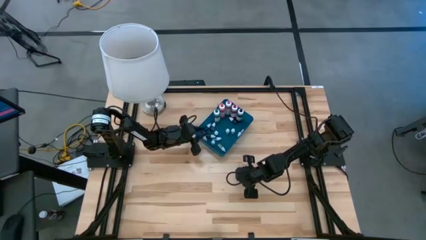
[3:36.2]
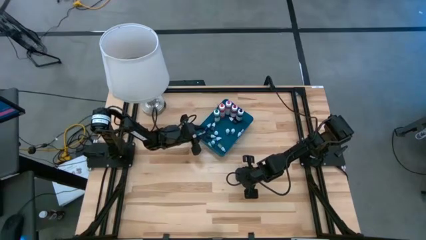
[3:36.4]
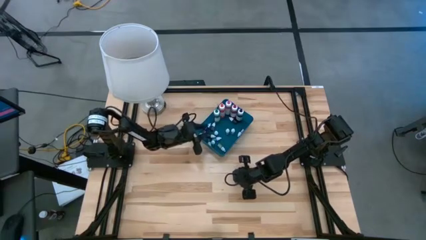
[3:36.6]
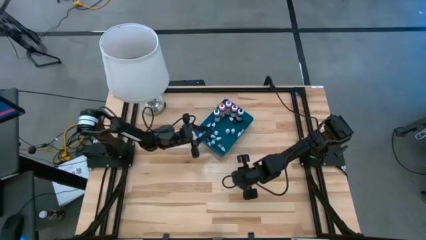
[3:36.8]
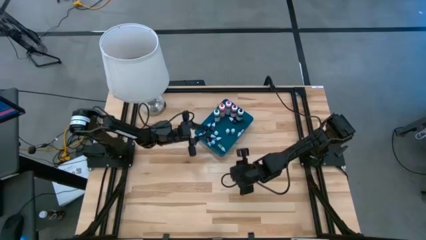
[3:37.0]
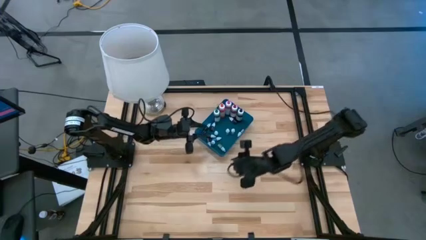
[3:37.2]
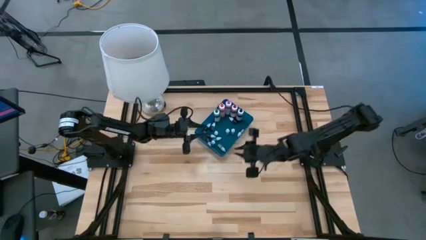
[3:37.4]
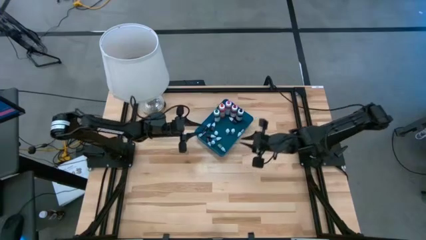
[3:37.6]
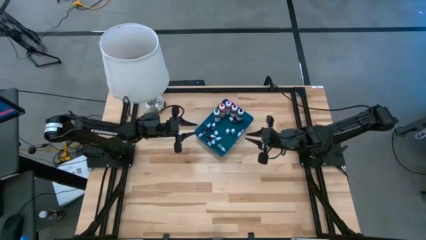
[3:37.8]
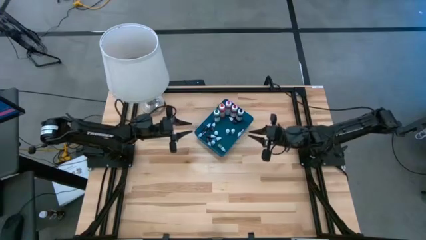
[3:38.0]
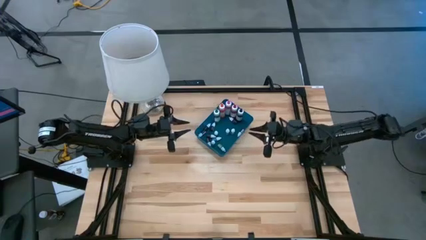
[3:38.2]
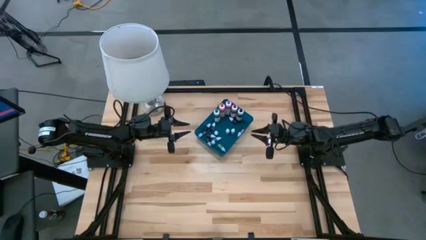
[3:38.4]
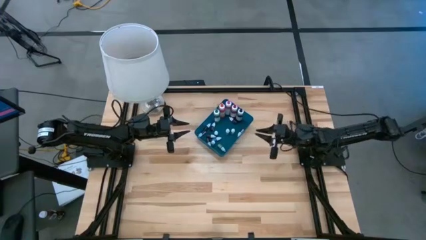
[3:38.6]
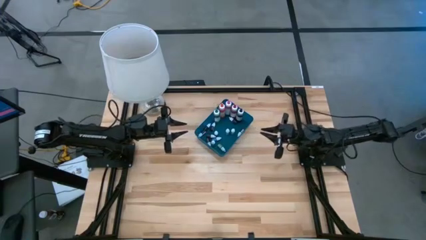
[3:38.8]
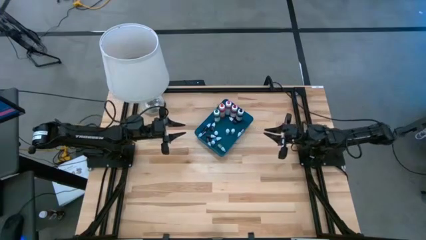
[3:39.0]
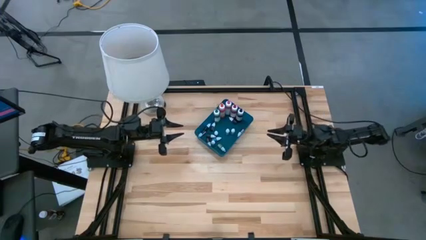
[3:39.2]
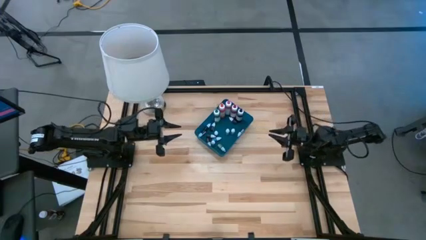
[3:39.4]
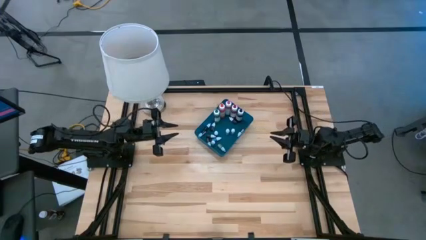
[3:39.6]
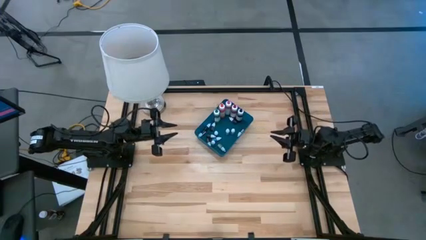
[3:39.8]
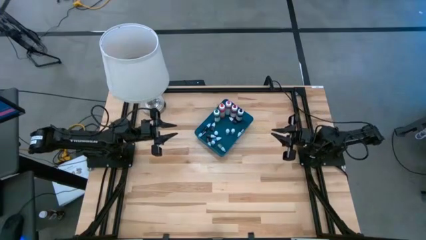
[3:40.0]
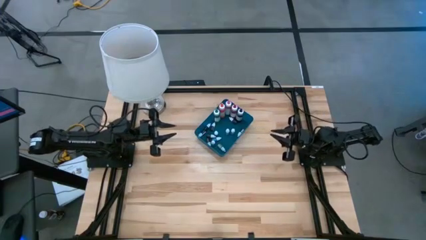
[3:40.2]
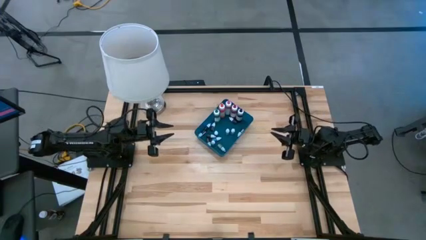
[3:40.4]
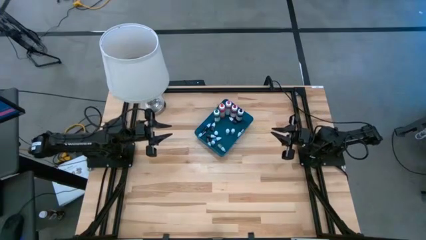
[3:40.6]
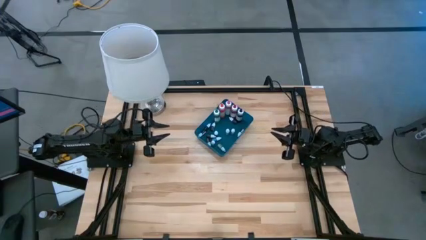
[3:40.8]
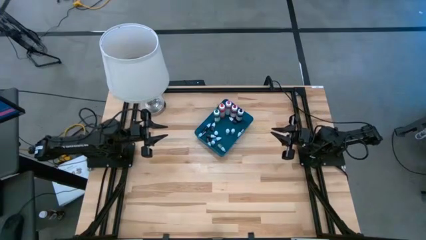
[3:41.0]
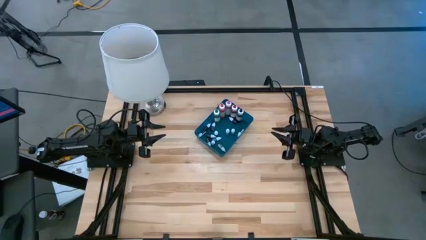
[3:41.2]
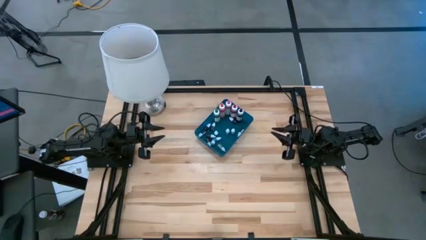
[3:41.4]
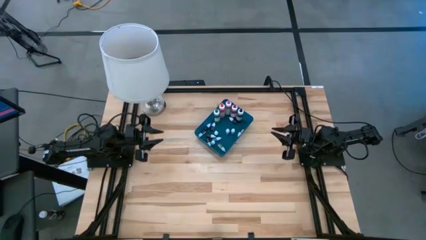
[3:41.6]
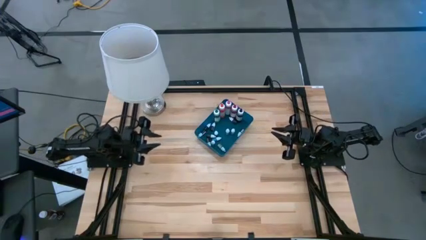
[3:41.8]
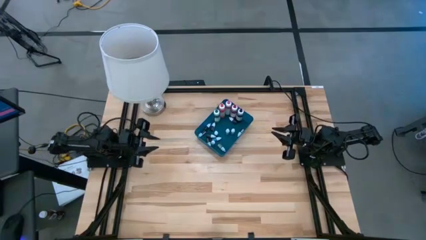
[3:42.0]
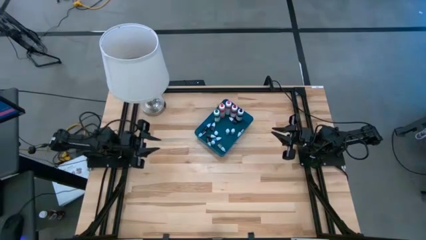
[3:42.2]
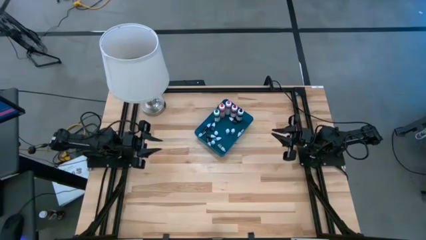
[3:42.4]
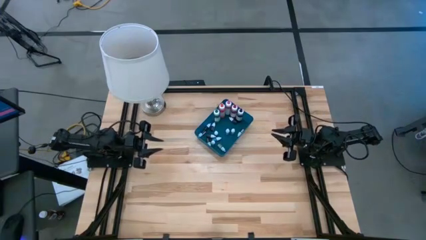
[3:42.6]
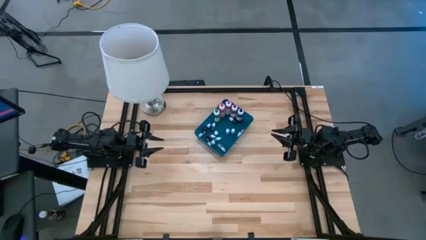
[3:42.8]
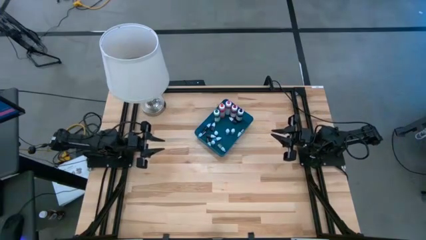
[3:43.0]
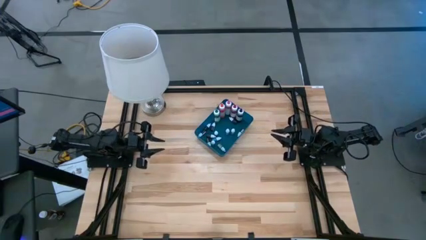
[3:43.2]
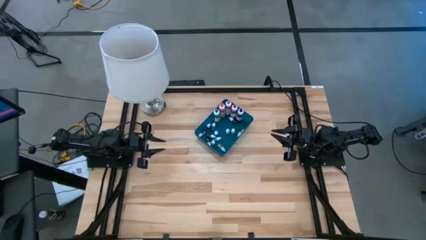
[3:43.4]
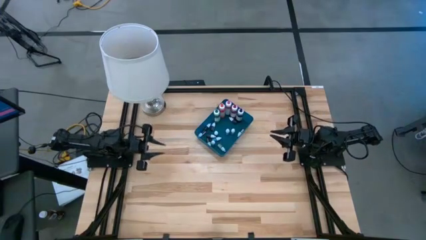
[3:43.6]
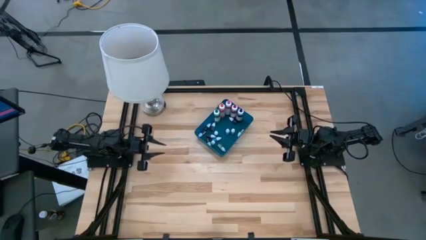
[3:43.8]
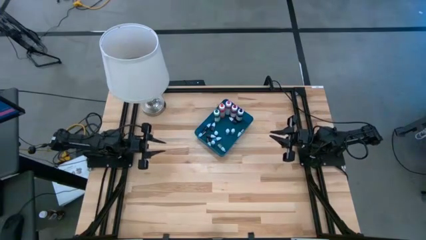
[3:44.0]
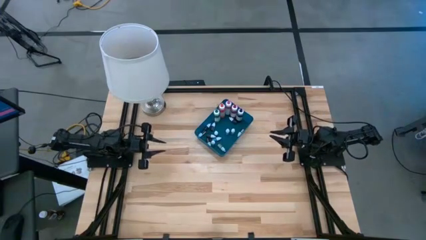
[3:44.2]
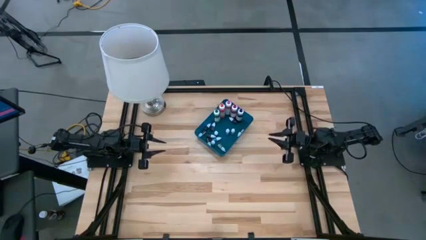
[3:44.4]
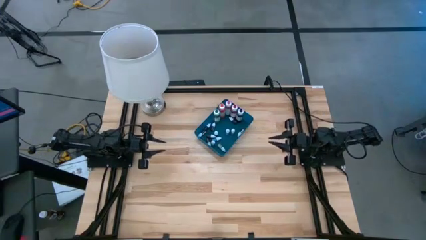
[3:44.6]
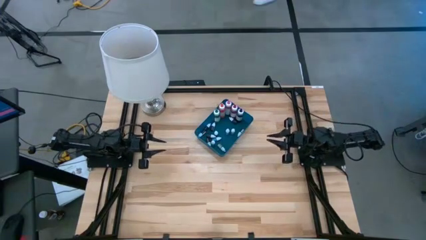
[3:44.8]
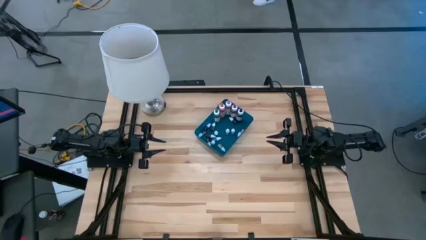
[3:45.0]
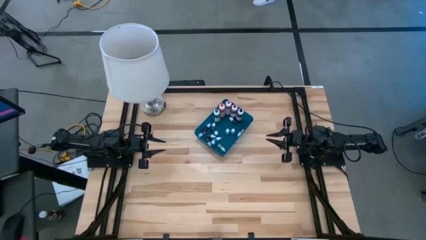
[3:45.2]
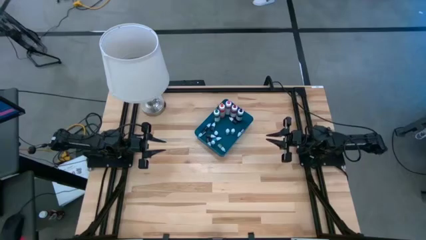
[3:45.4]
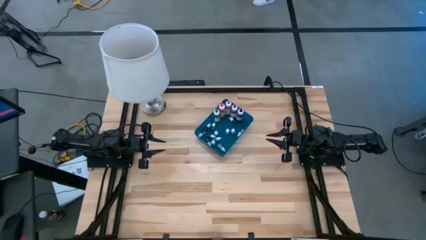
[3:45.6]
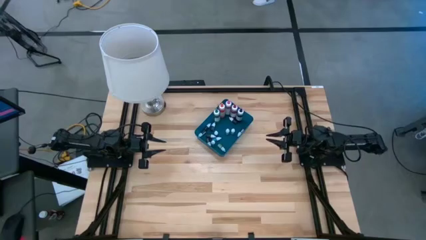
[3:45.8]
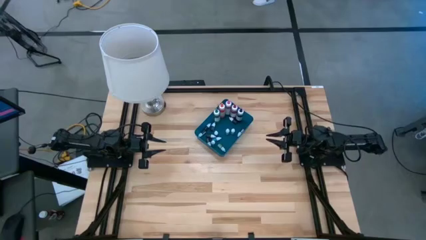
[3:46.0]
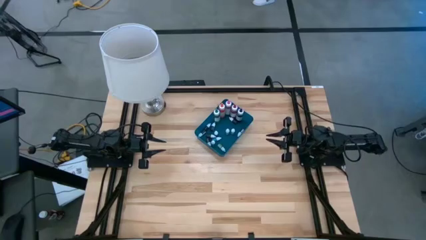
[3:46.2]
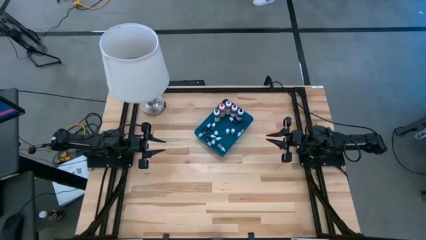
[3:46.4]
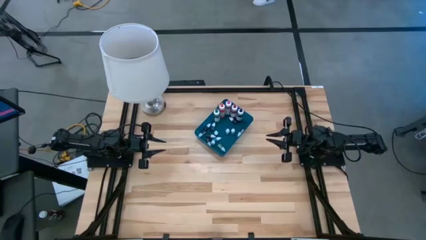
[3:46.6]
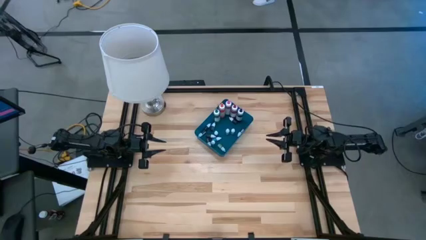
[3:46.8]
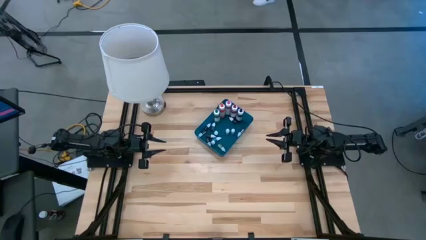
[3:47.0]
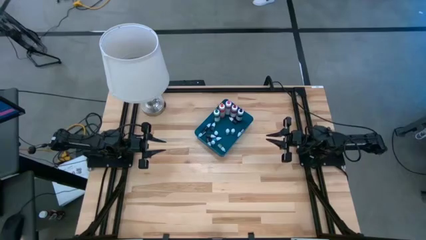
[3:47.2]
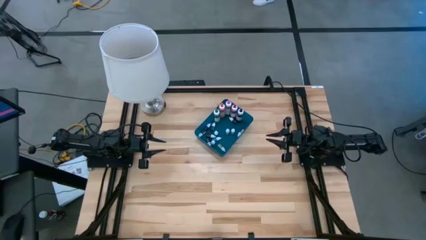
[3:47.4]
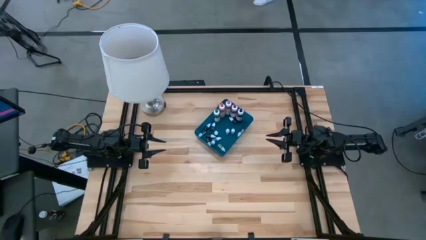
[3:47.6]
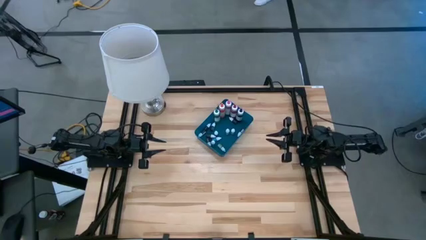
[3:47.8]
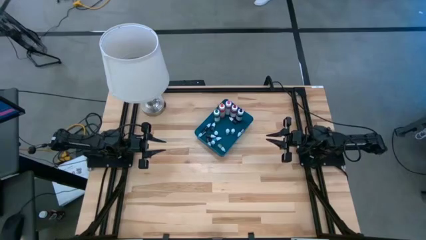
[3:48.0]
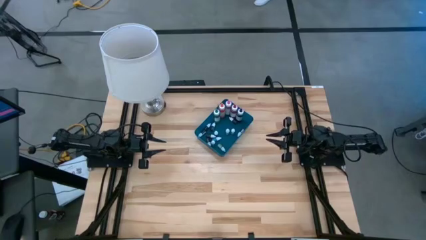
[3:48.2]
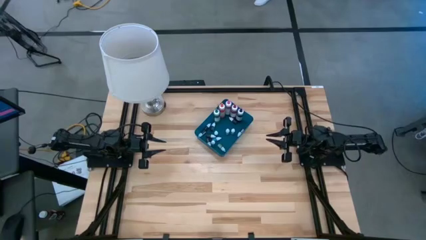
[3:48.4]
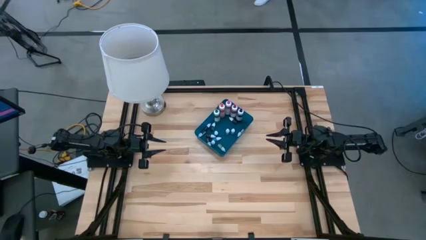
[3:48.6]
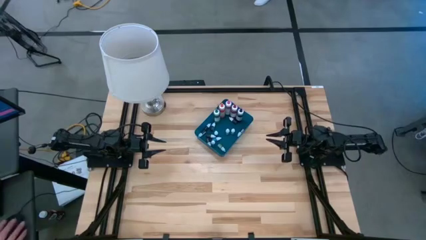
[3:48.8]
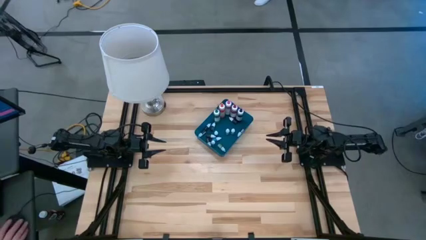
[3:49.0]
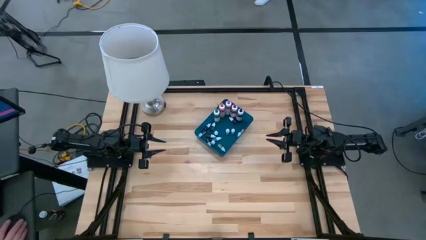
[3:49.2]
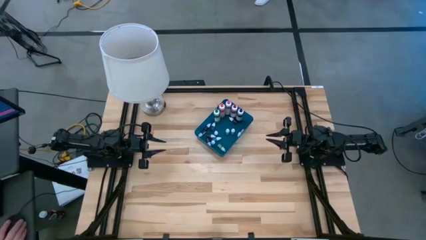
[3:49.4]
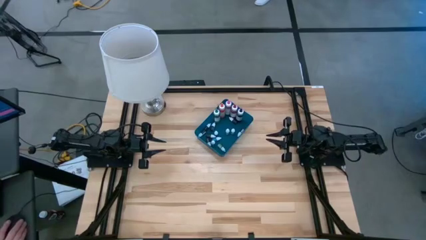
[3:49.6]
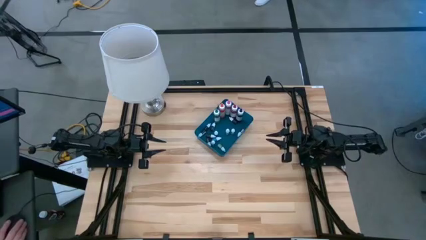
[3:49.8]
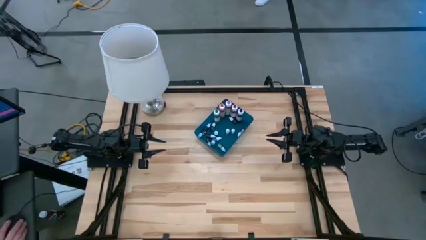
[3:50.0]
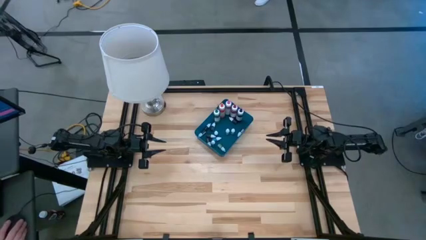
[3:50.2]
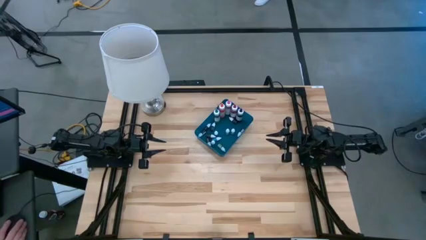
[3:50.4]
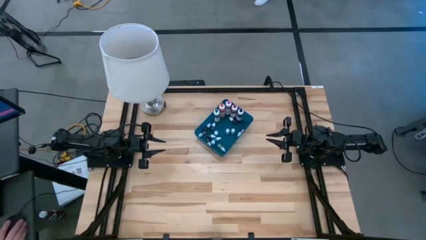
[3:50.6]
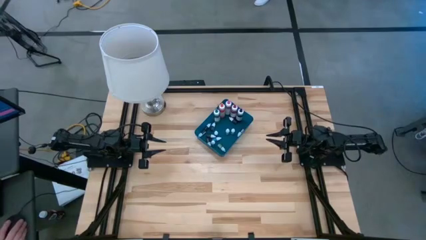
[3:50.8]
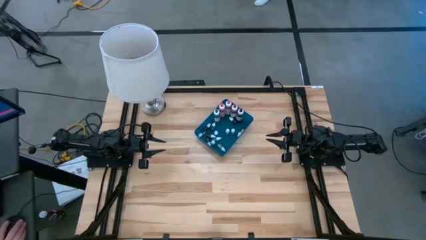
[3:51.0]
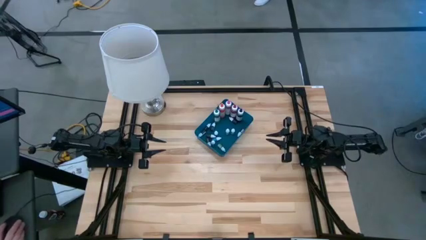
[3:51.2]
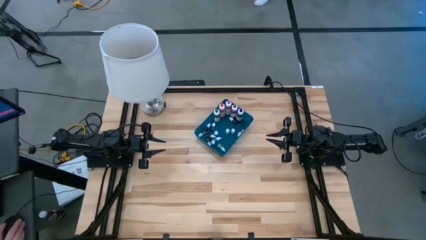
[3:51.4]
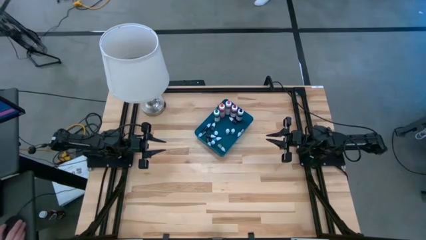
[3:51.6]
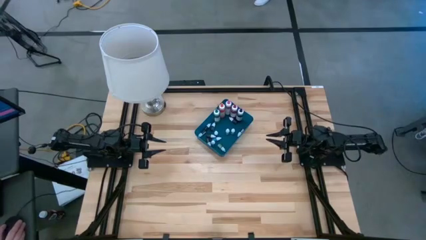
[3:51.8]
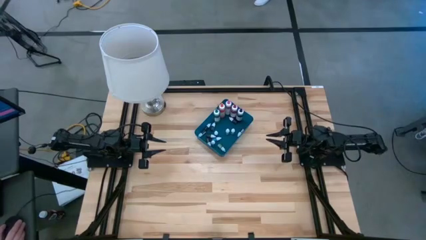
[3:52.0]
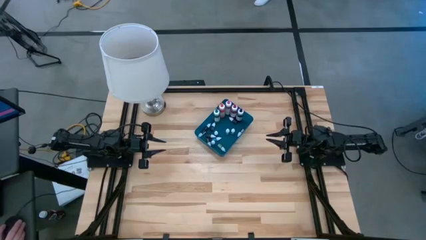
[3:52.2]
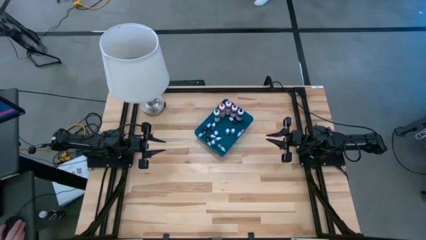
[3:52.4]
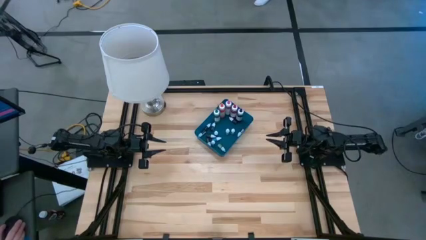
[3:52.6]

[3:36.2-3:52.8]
Task: Pick & Place food coloring
Return to Home Position
